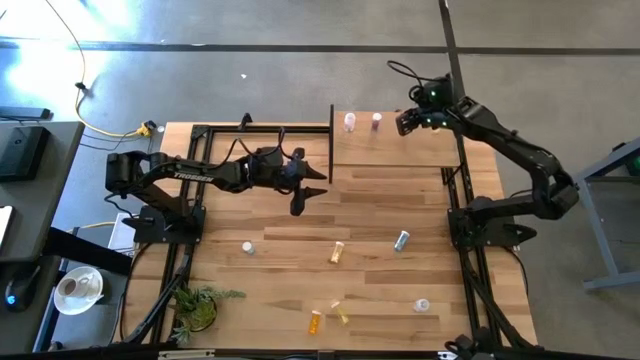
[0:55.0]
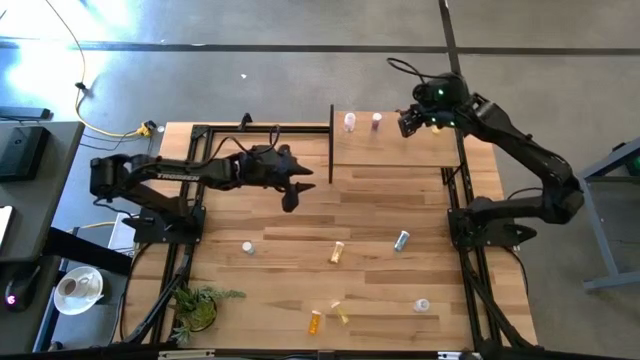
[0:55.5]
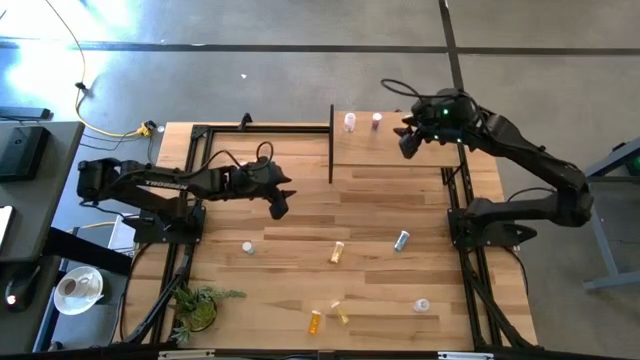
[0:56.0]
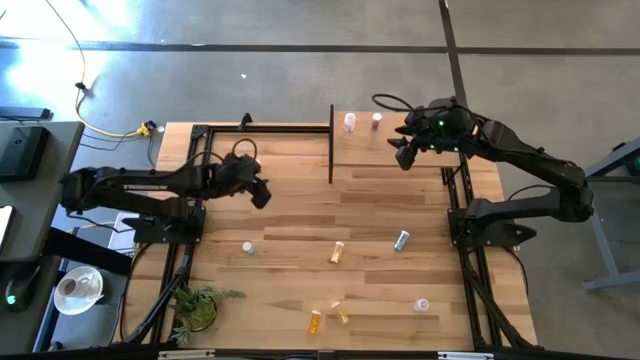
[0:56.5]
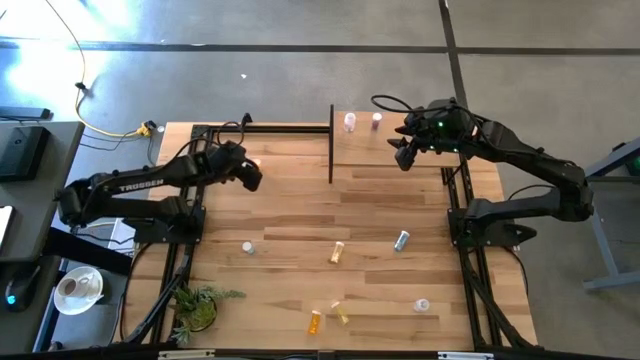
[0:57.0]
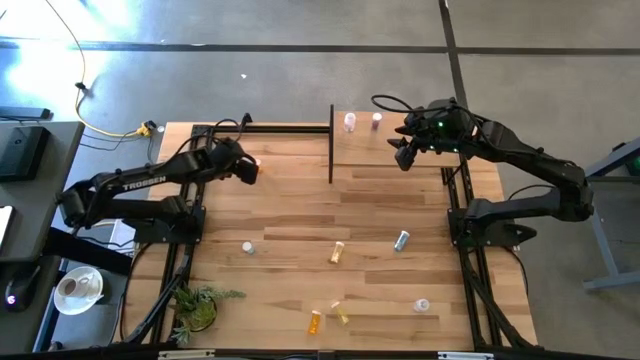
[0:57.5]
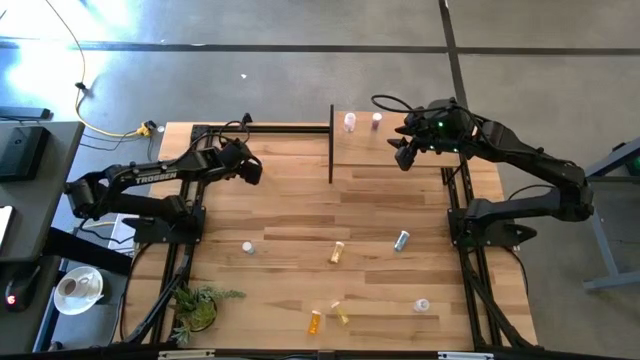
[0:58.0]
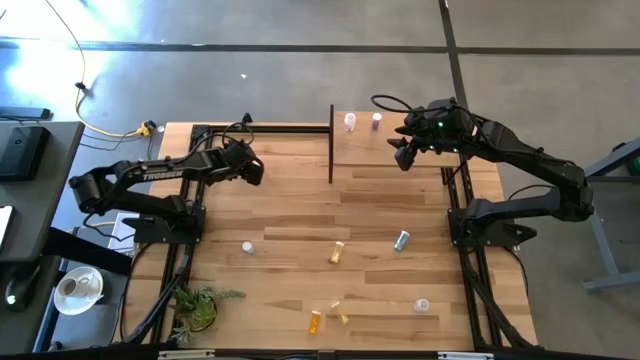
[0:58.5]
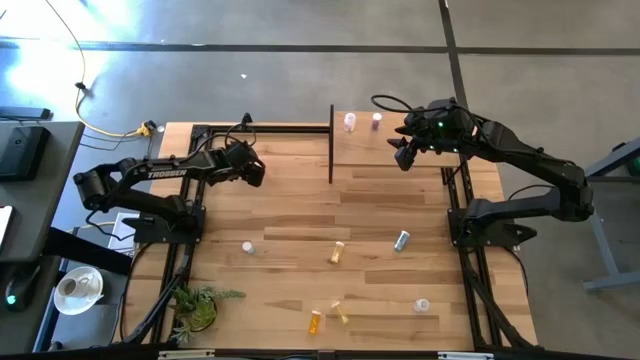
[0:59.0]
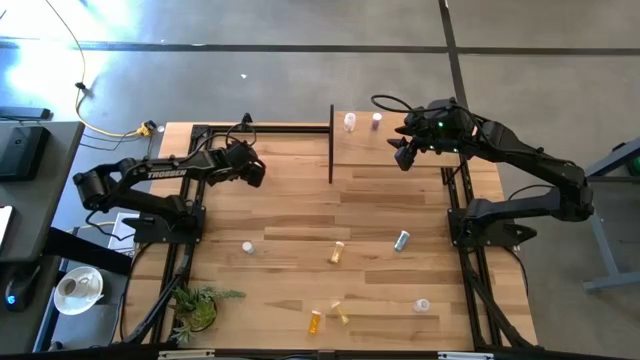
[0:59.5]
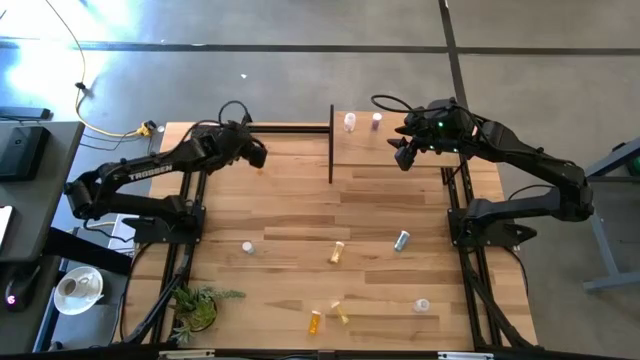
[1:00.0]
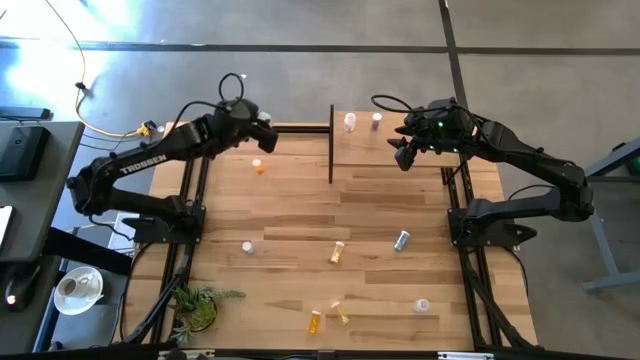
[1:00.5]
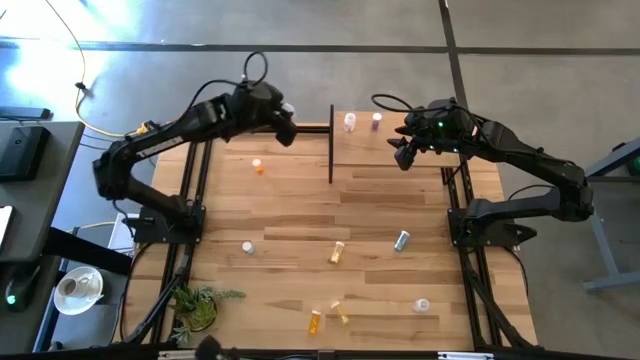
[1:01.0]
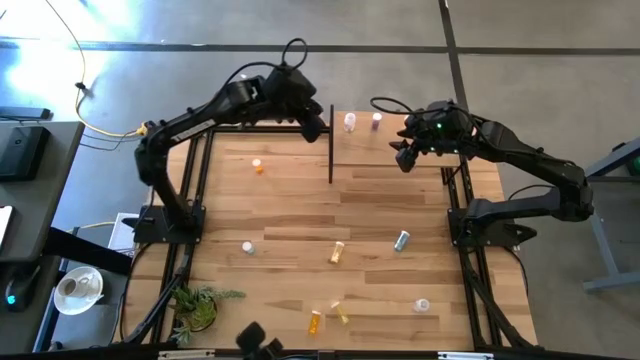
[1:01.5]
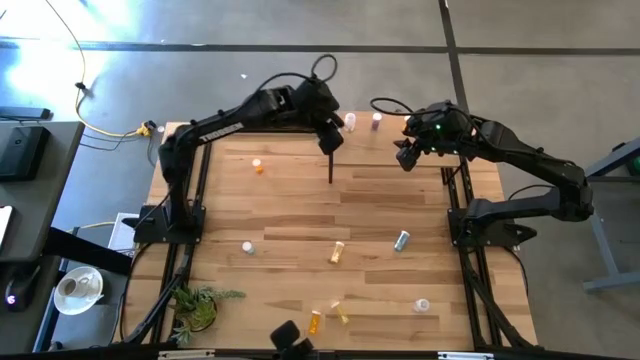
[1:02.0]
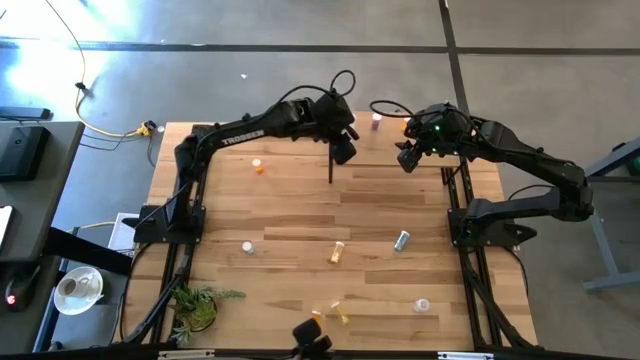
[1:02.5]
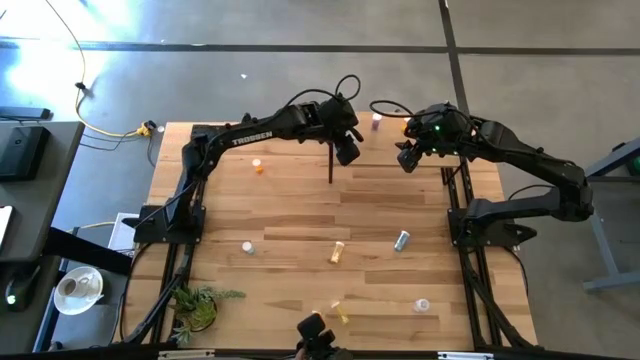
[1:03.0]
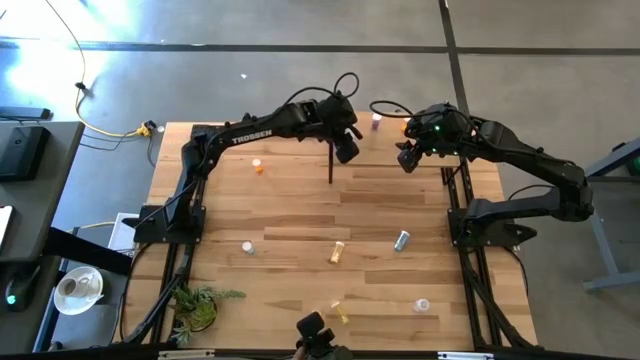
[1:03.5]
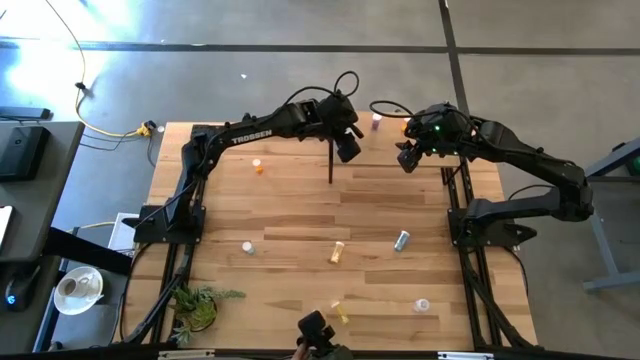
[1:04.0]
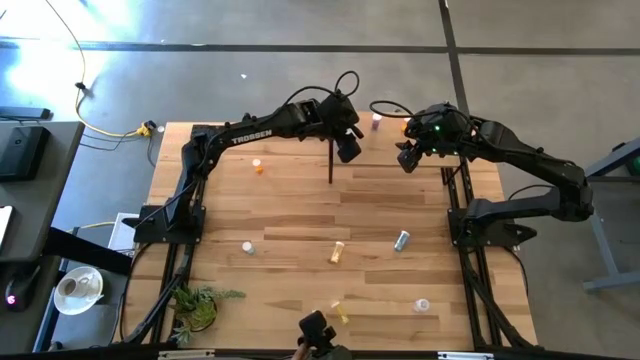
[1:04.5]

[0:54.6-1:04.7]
Task: Pick and place medicine bottles onto shelf by color
Put the top transparent pill bottle on the shelf aligned with the other transparent pill bottle

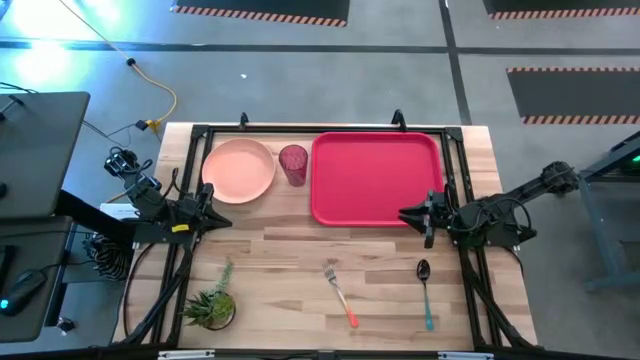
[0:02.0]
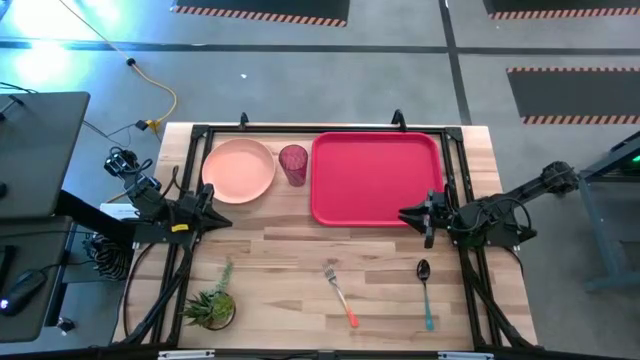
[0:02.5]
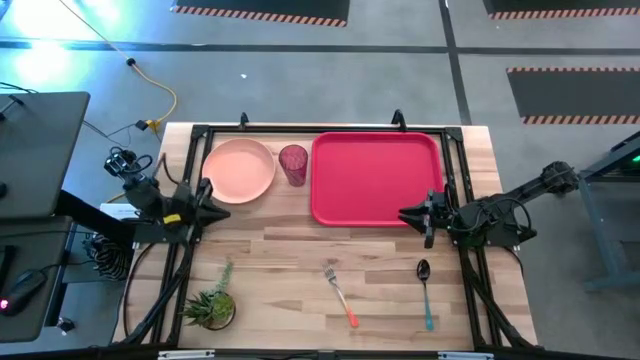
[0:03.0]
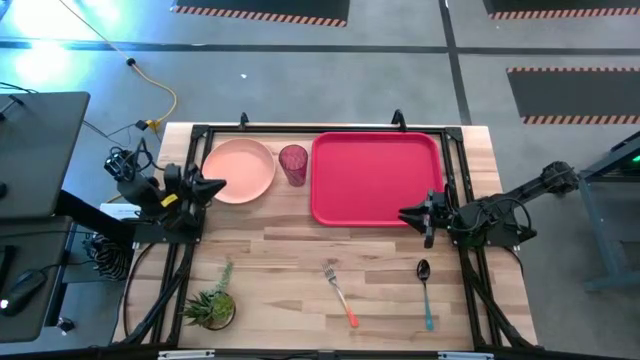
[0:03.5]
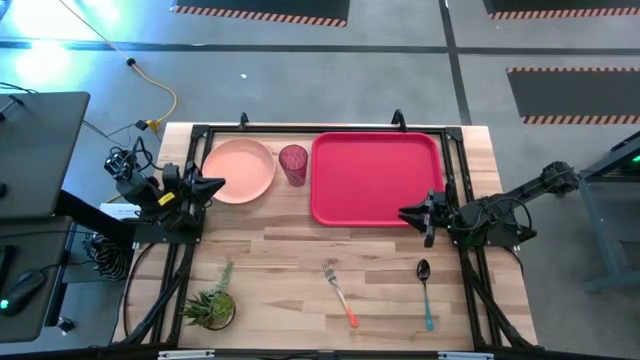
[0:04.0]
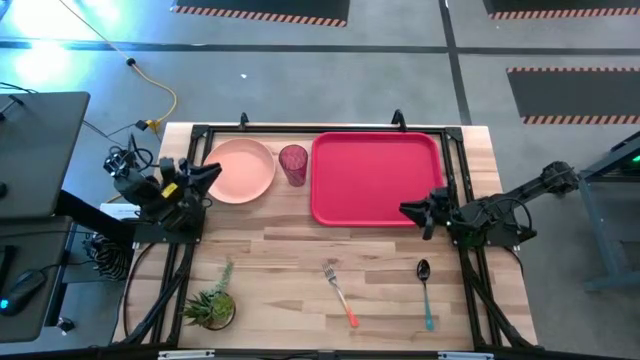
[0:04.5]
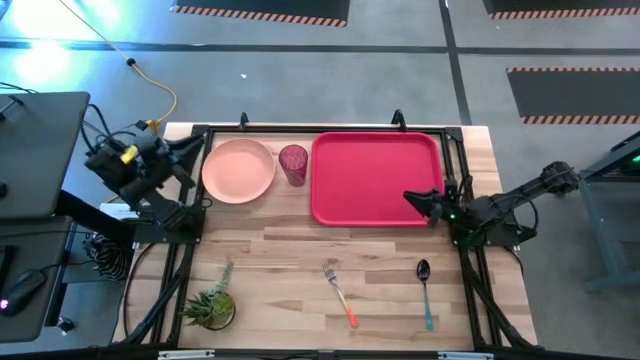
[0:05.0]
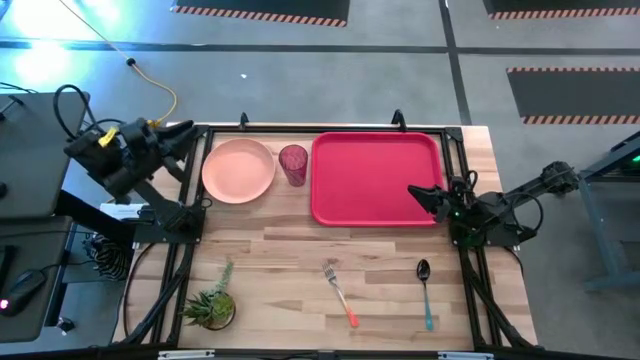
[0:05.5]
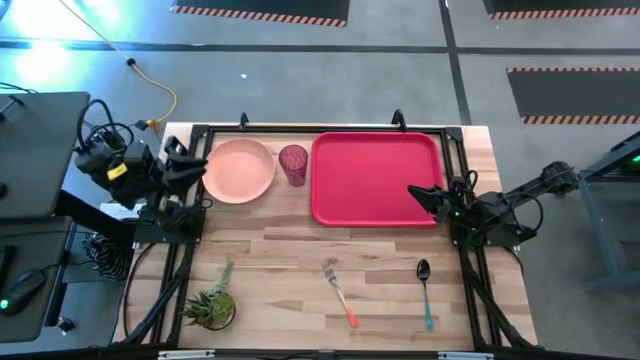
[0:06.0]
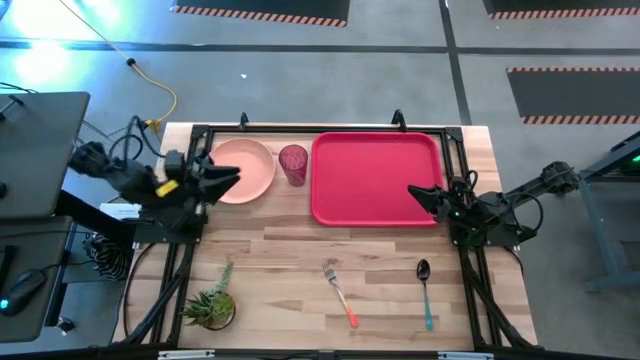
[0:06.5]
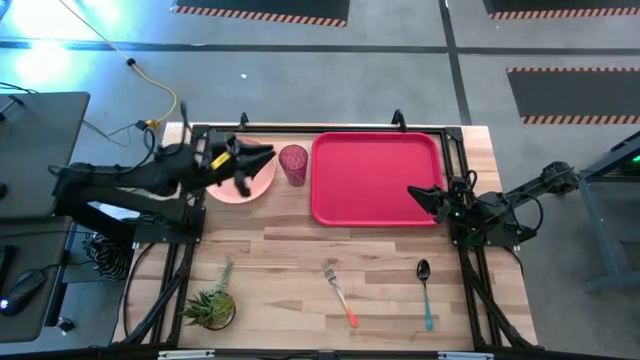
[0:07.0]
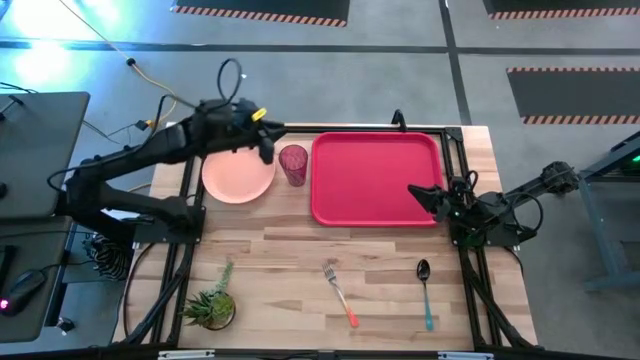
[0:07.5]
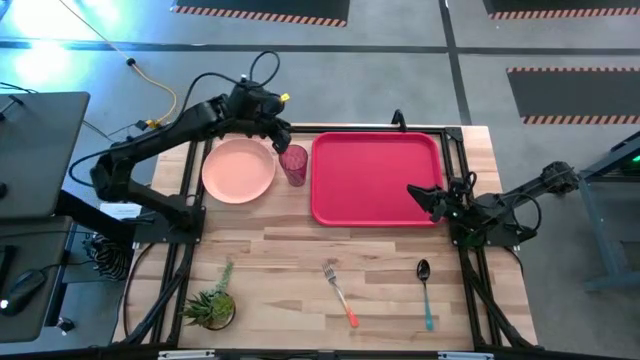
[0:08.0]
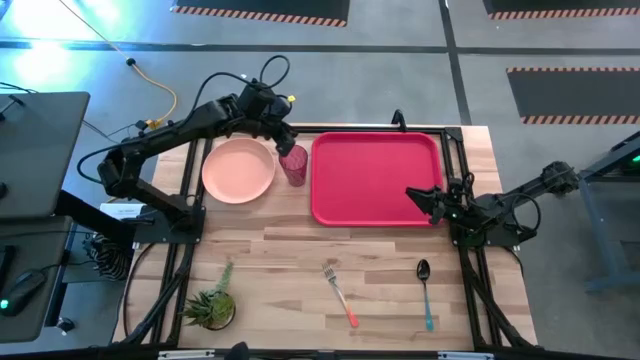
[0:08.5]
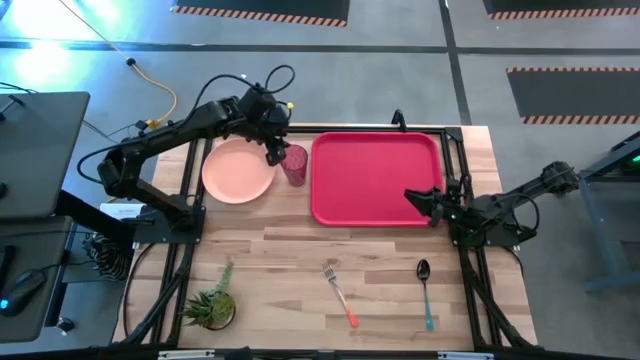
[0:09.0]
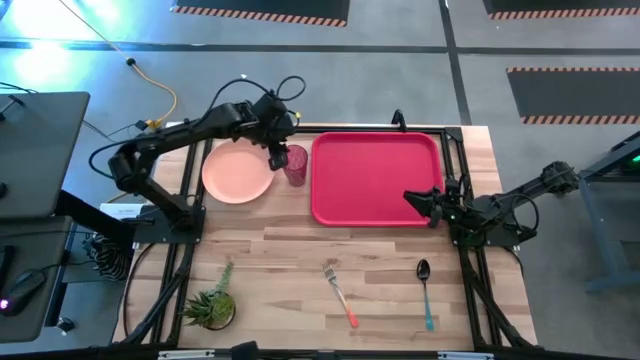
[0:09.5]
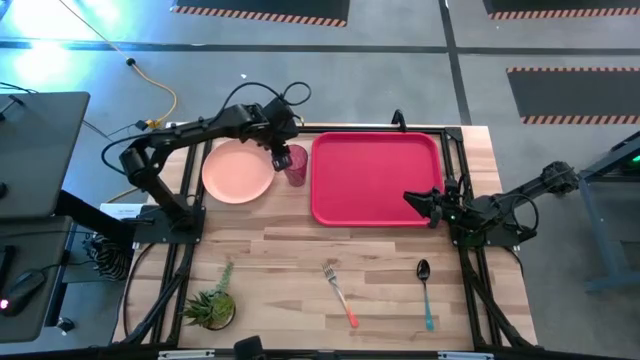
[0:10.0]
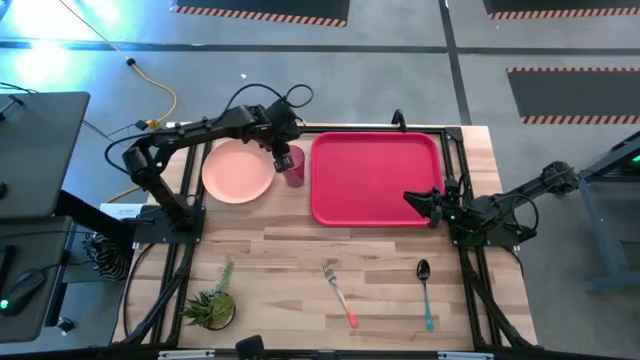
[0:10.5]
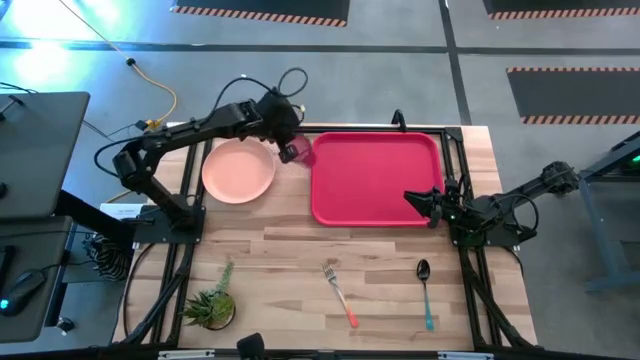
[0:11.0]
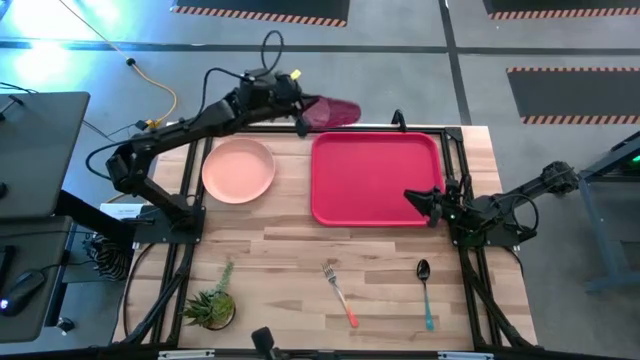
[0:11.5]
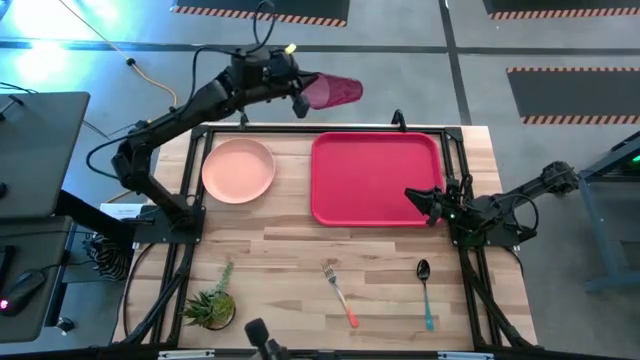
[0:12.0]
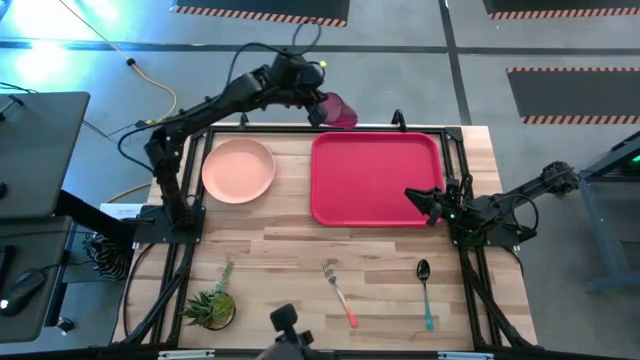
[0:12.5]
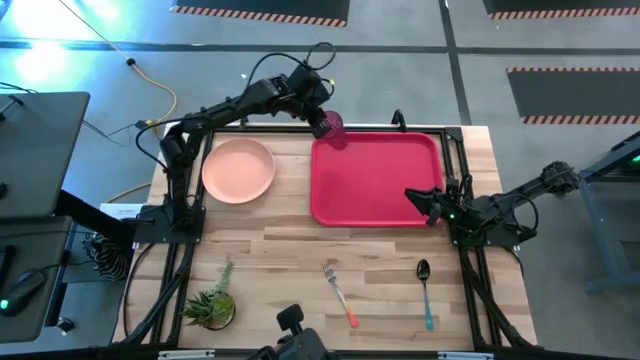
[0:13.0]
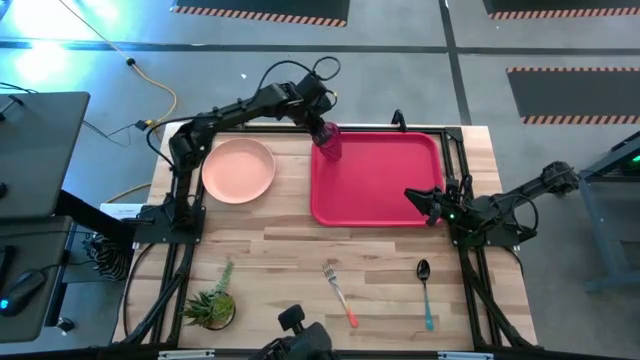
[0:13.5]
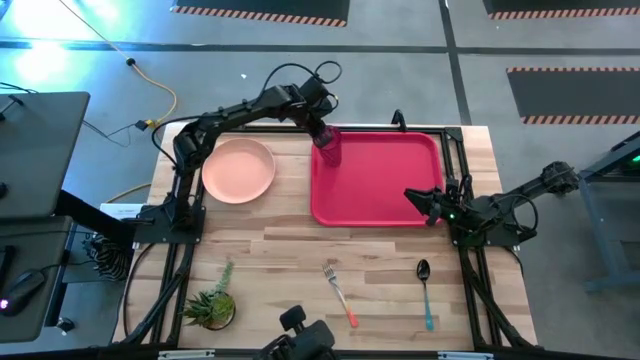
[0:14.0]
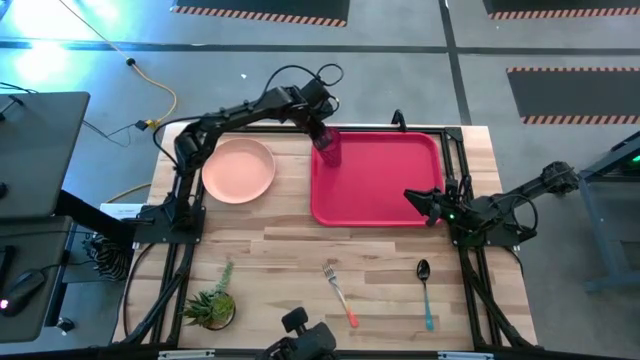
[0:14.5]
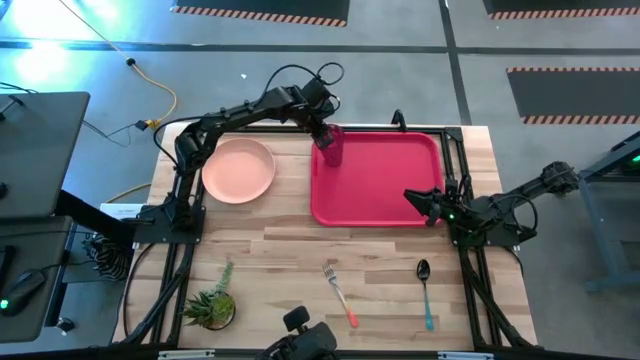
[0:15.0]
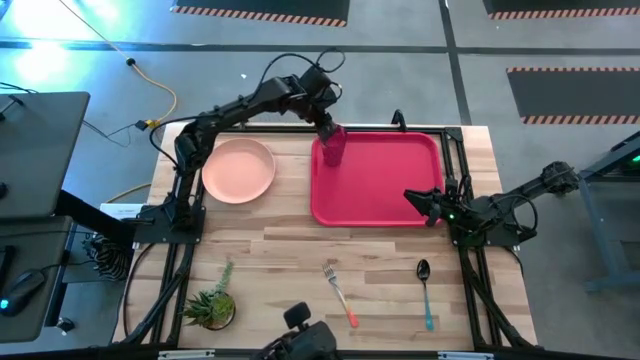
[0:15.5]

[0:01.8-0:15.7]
Task: Pick and place plate/cup/fork/spoon on tray
Put the red glass on the top left of the red tray
